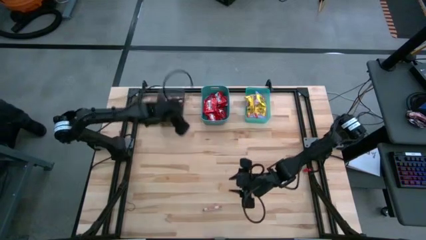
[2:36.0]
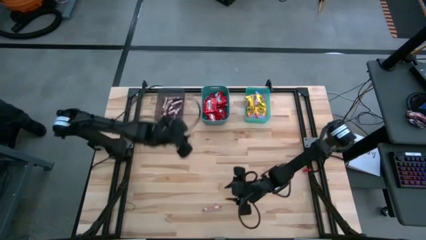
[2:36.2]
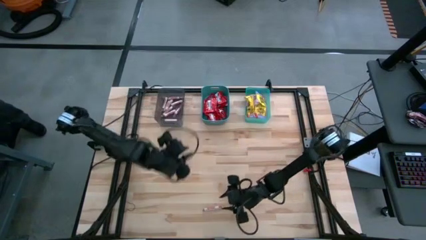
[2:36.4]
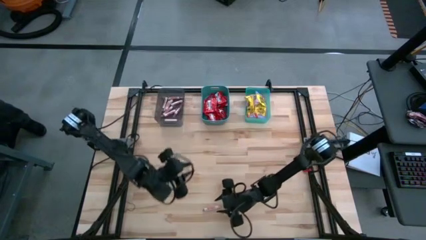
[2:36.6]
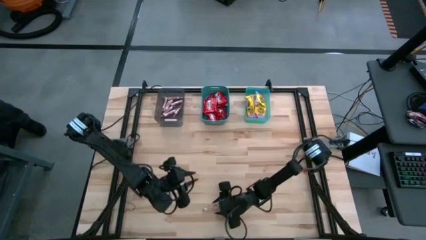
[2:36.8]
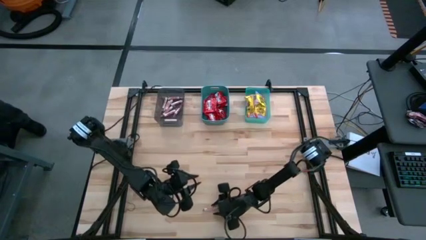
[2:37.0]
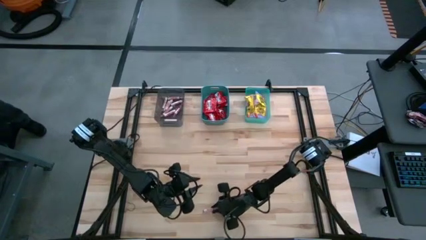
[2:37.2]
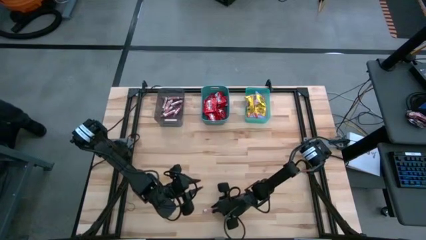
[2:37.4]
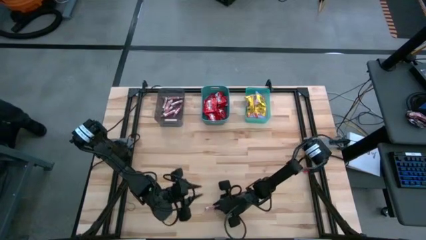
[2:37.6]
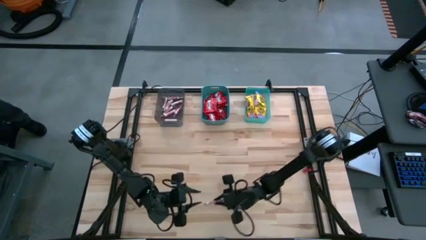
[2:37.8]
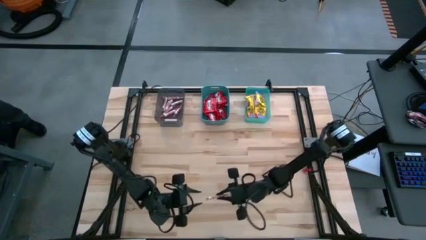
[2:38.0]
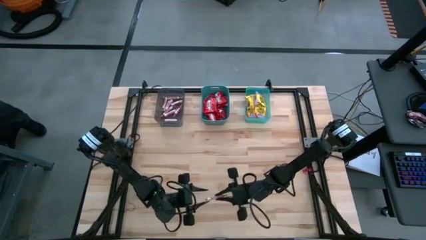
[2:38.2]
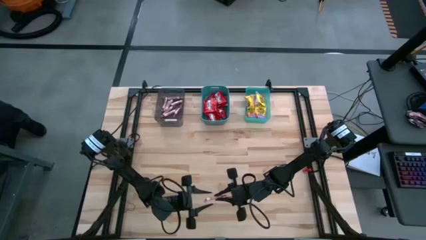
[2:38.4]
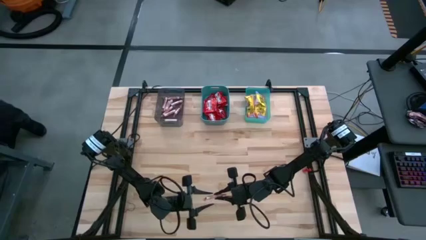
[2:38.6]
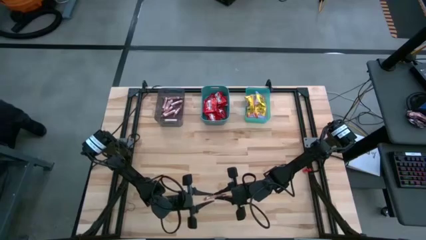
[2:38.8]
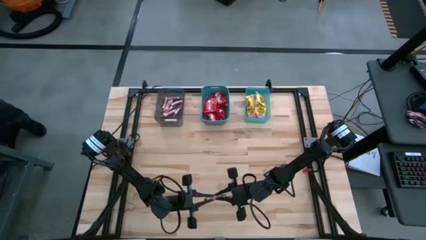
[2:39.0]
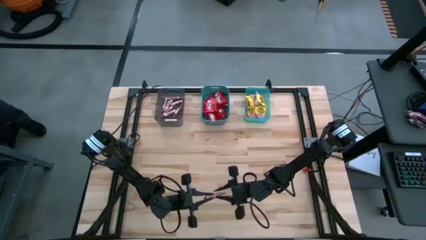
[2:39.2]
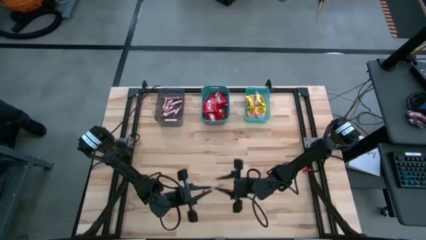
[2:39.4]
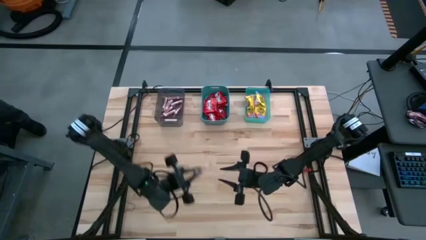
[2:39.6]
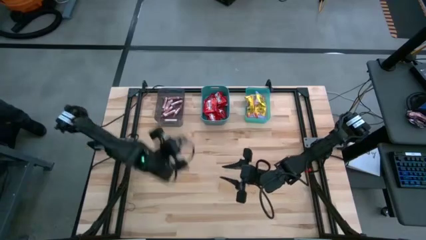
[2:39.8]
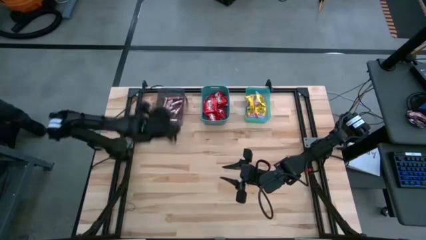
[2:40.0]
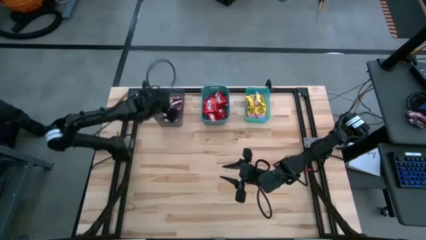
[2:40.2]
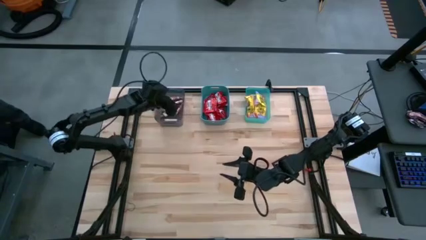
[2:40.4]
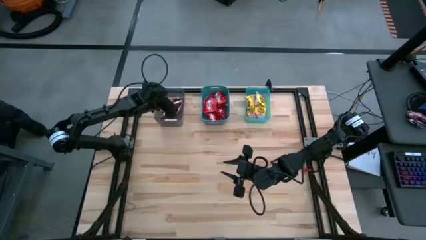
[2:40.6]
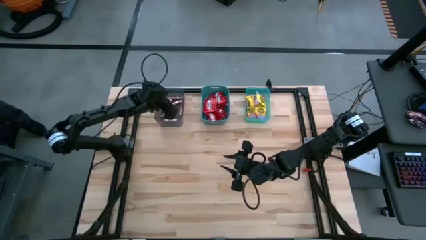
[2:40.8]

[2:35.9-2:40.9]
Task: Sort candy
Put the white candy on the black bin

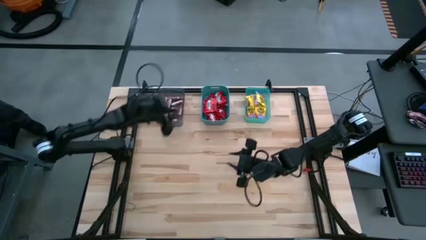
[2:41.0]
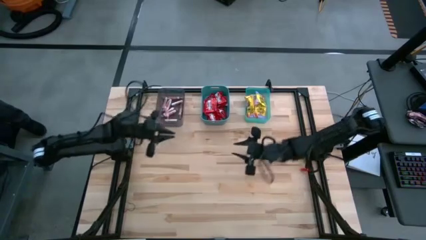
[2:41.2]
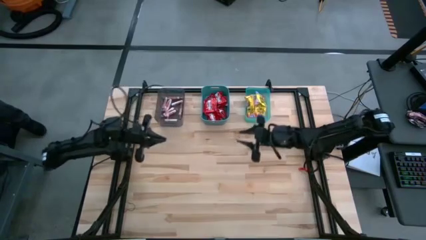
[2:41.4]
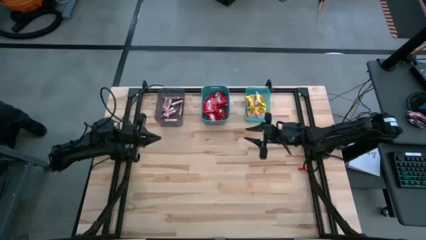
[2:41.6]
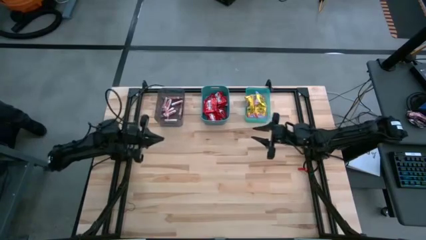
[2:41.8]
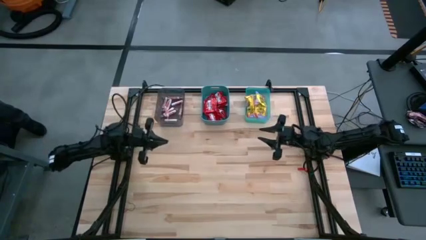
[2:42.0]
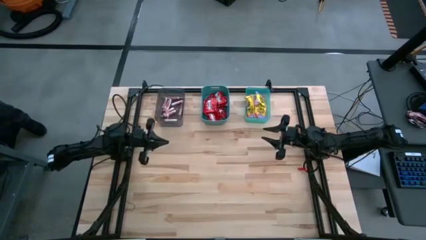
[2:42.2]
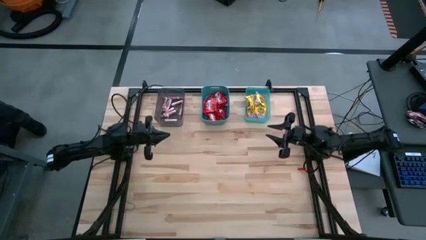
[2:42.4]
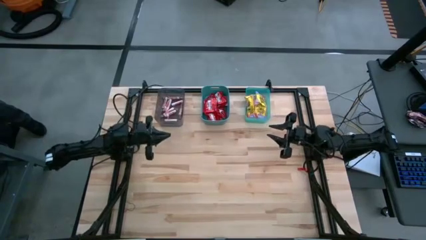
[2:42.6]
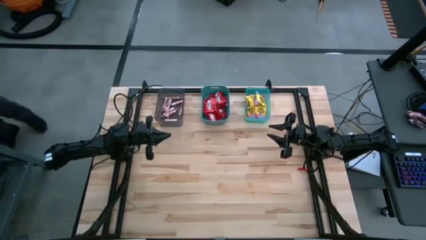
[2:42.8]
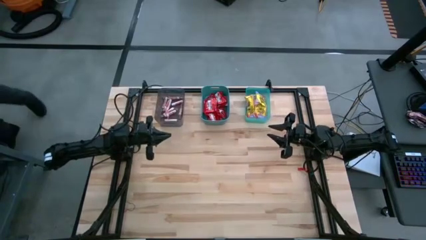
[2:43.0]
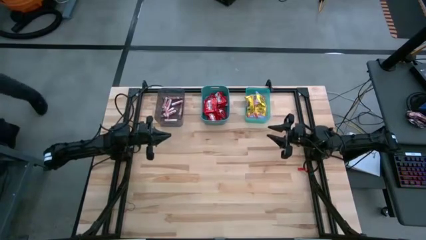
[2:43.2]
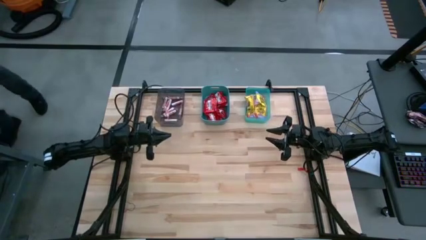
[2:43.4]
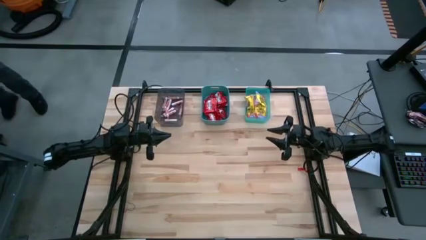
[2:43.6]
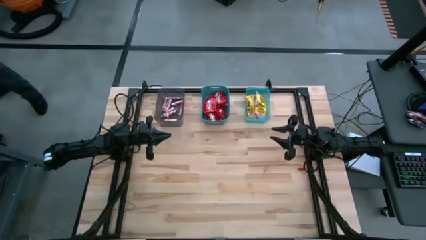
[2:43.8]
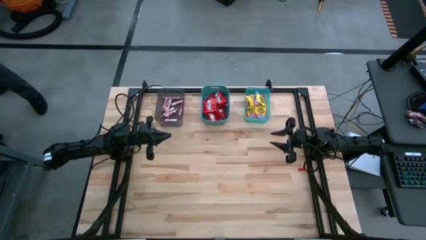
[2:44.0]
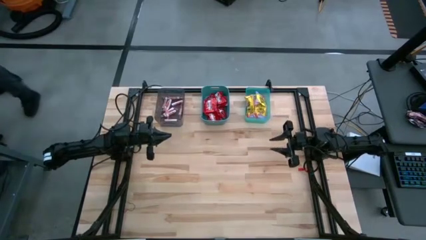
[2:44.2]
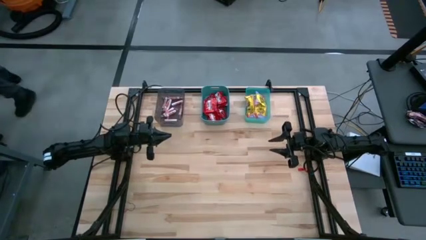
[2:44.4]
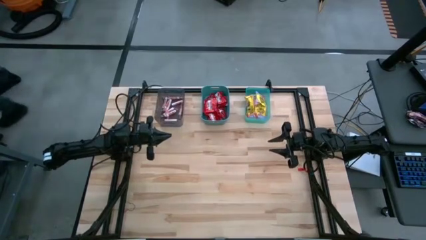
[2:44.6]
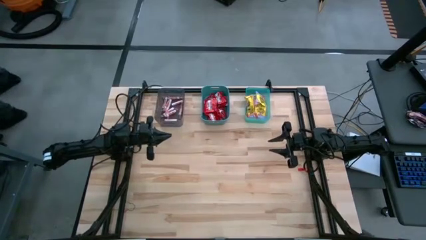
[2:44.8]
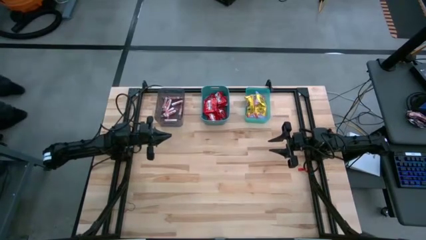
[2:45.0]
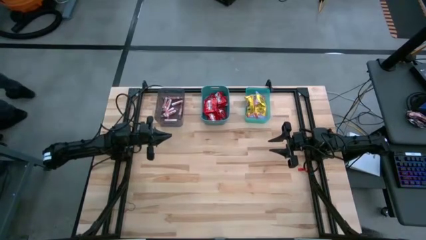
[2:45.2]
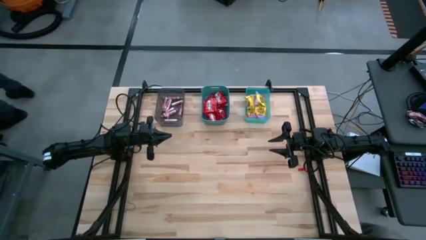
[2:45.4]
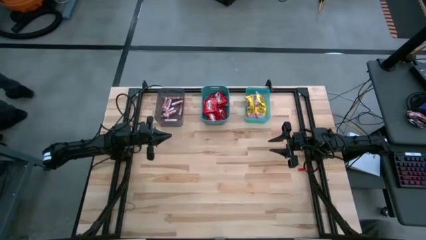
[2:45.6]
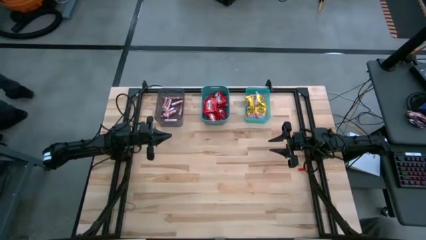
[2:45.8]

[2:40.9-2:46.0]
Return to Home Position

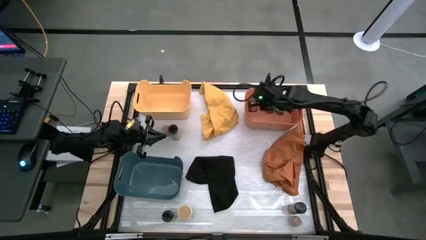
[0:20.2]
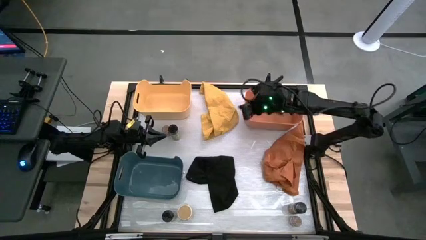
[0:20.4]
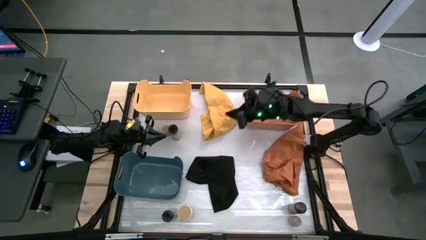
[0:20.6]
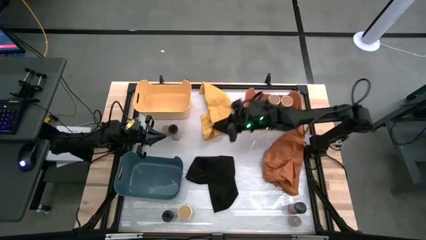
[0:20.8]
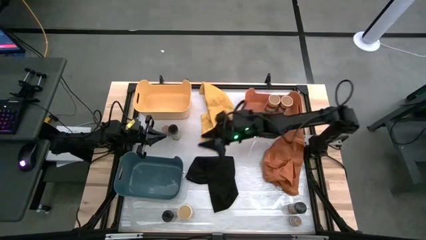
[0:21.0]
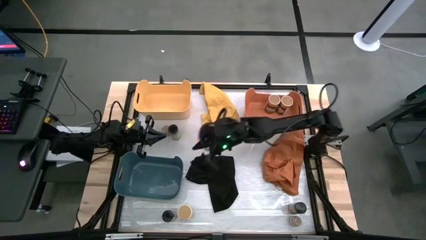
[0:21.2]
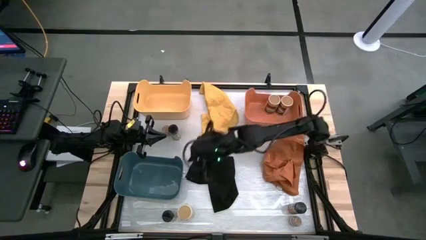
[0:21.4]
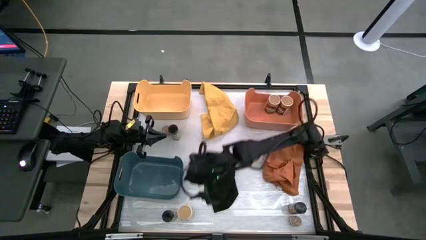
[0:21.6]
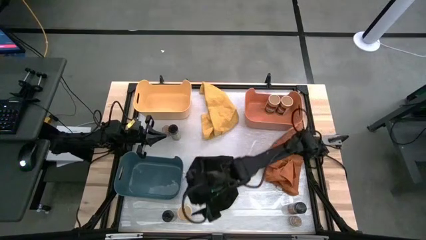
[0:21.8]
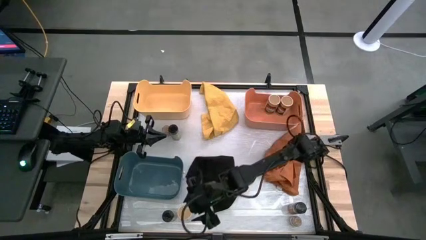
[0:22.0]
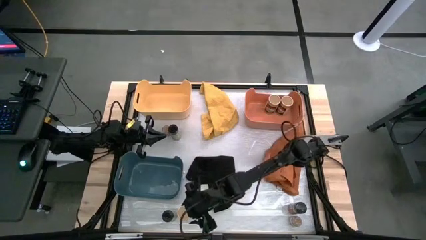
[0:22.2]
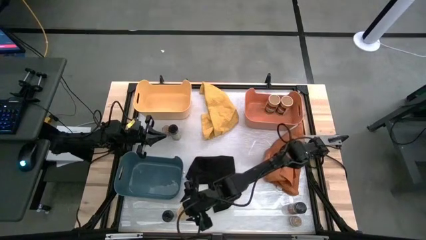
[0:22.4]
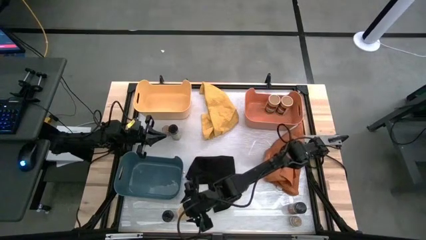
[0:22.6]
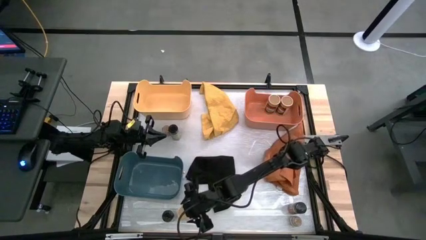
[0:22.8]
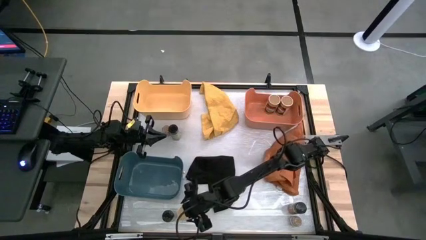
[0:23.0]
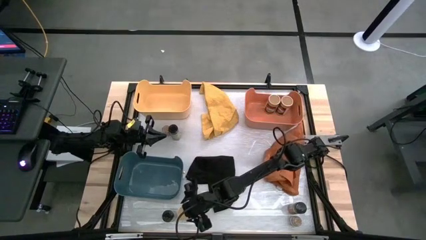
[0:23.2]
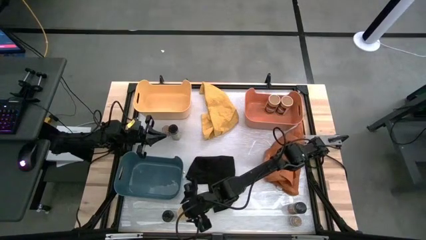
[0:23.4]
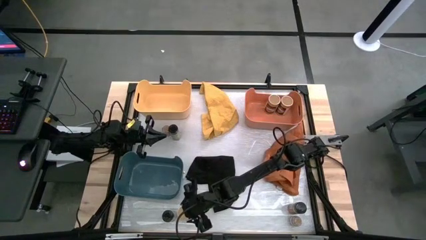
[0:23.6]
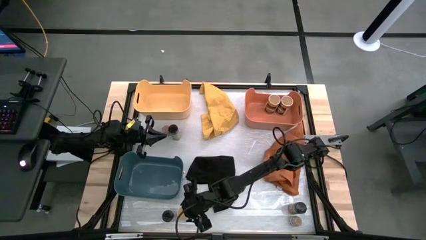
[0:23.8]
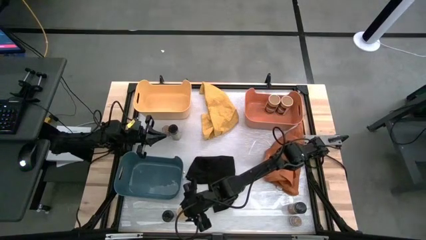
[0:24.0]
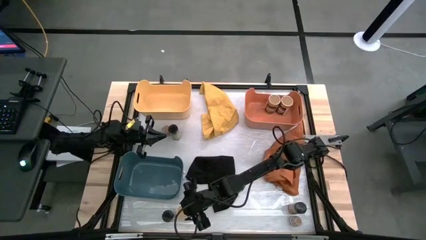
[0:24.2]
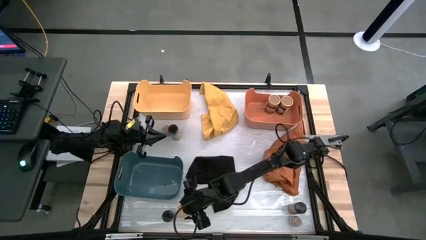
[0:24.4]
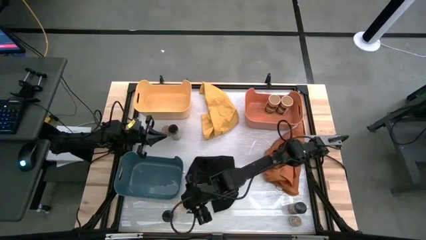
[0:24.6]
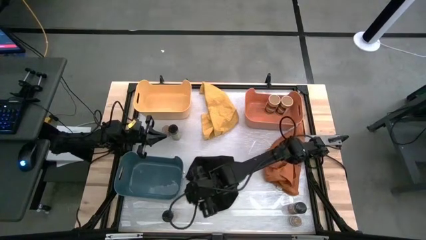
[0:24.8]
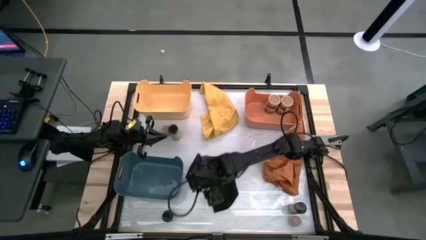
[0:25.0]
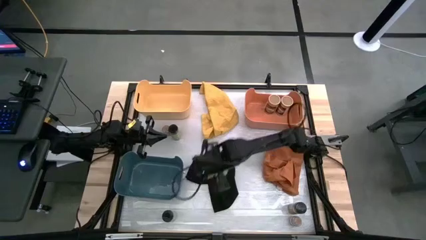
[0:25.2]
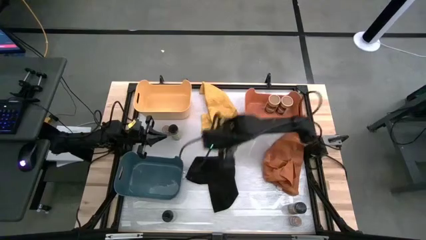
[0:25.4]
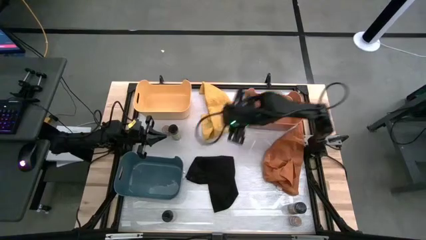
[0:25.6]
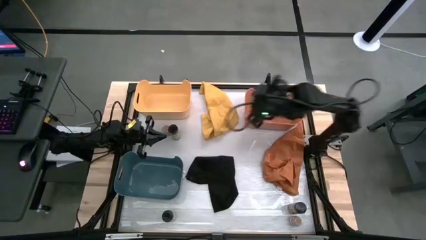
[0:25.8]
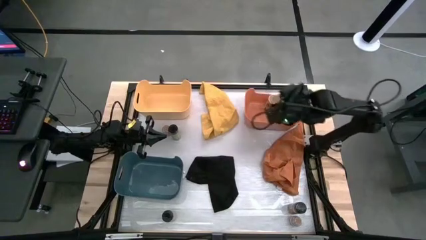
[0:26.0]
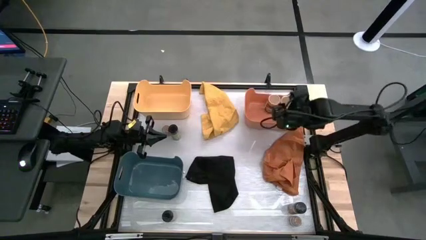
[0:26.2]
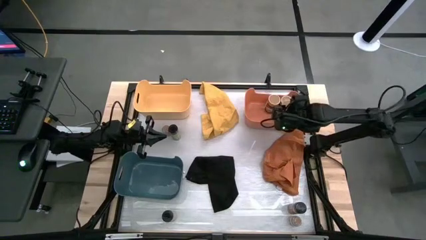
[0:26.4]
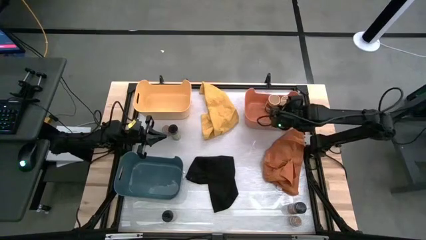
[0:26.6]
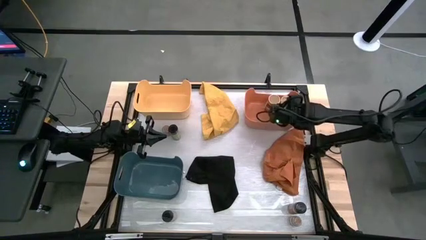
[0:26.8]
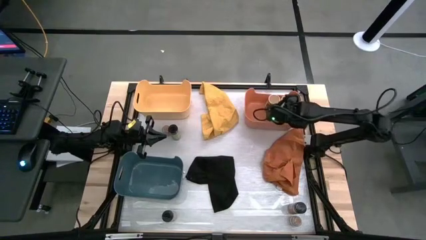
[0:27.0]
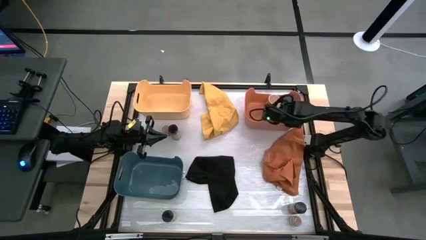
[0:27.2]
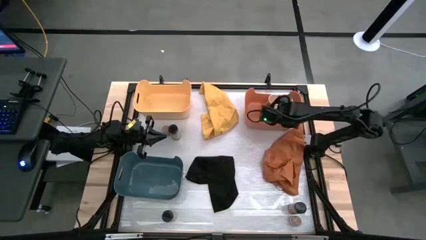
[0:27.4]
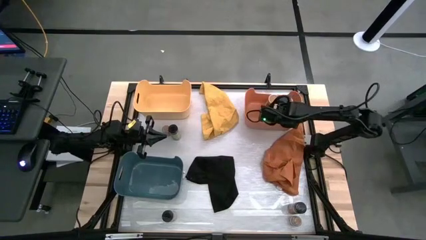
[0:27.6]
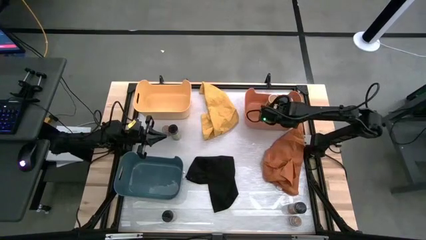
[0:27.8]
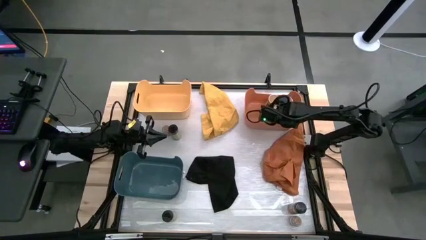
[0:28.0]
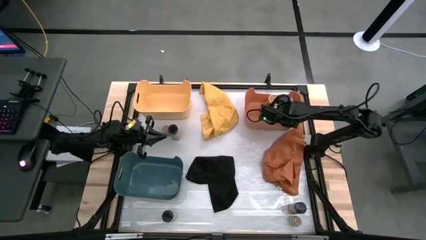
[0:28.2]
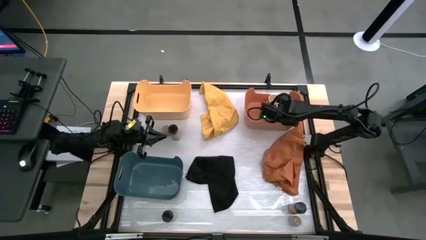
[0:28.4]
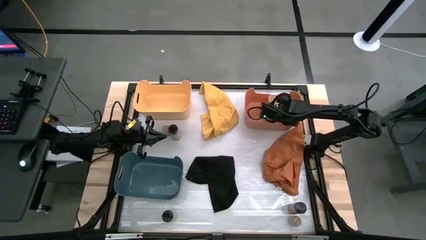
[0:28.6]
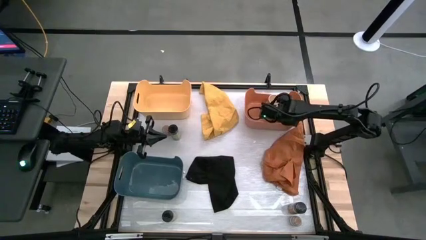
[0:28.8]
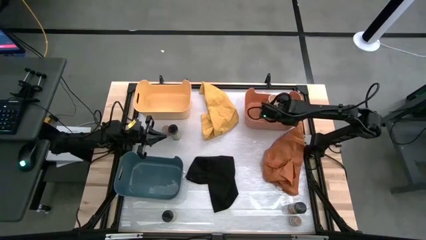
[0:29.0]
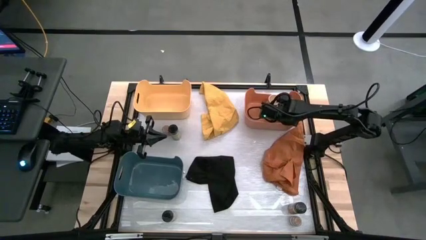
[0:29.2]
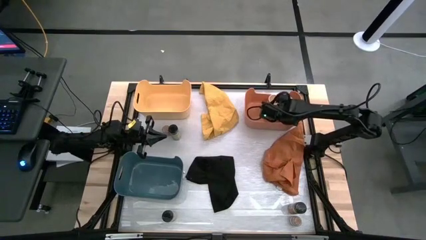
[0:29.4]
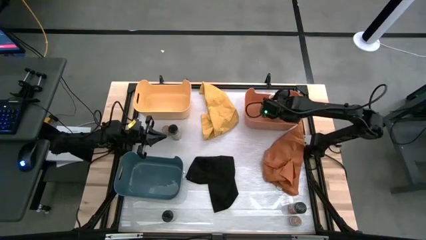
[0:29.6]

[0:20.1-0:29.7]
Task: Sort spices by type
Put the gold spice bottle into the orange bin
